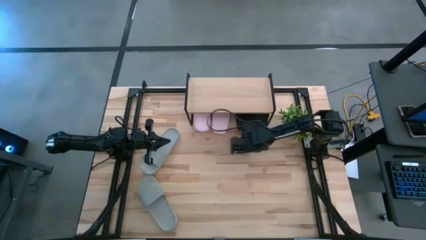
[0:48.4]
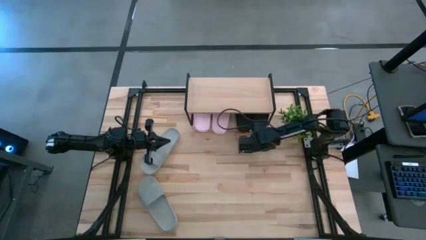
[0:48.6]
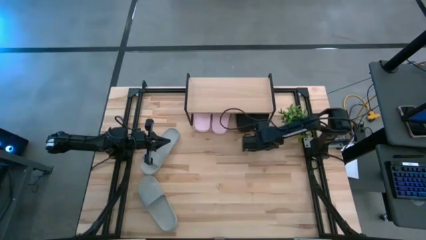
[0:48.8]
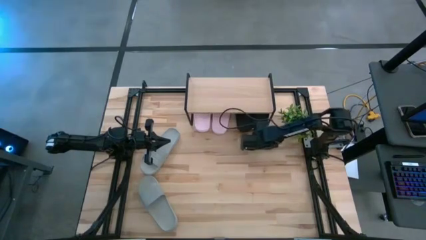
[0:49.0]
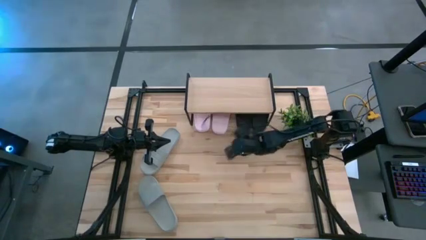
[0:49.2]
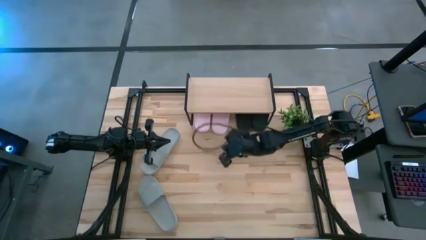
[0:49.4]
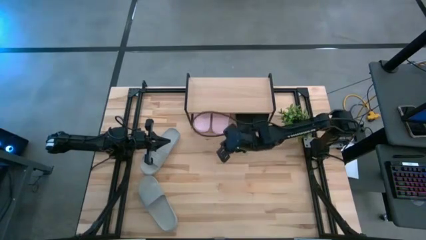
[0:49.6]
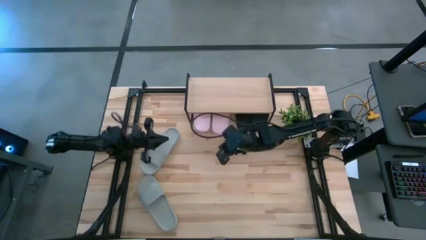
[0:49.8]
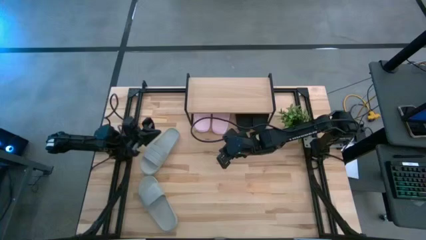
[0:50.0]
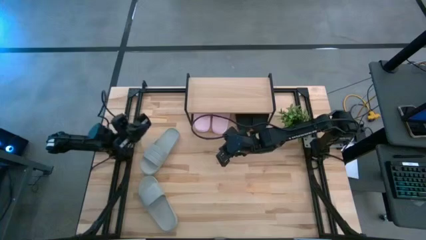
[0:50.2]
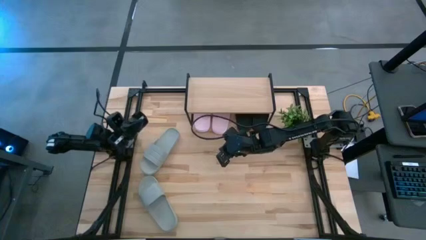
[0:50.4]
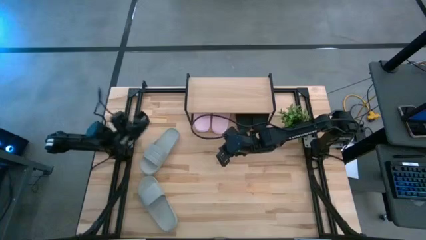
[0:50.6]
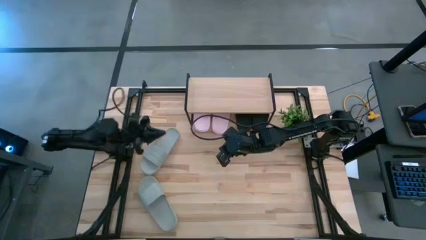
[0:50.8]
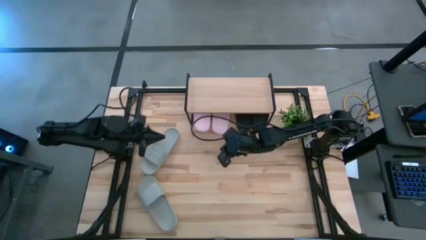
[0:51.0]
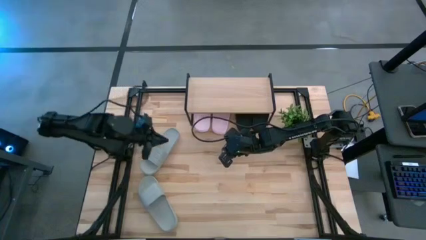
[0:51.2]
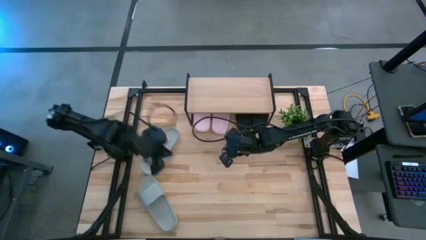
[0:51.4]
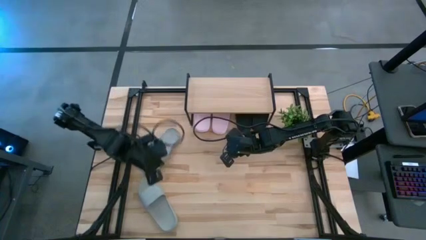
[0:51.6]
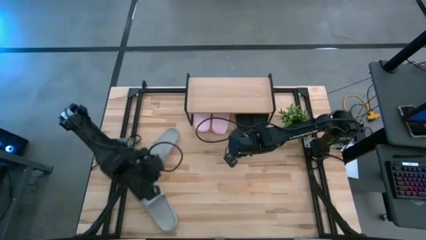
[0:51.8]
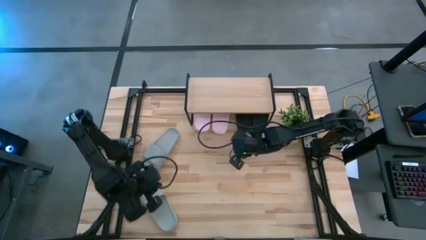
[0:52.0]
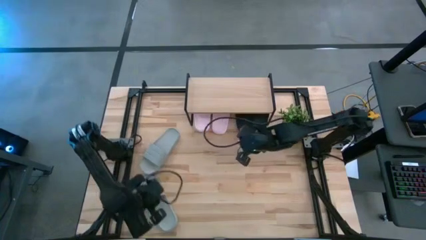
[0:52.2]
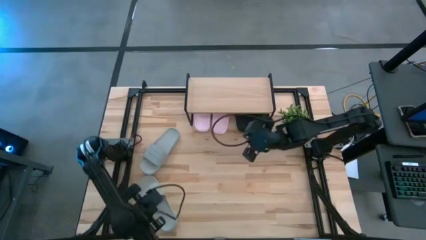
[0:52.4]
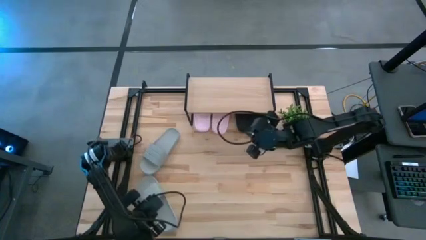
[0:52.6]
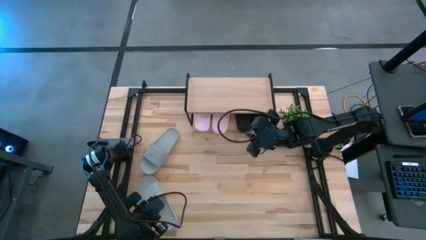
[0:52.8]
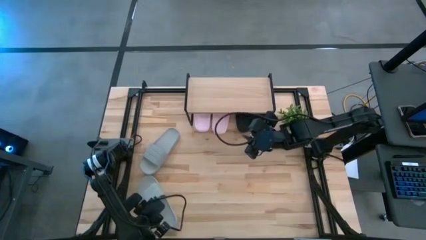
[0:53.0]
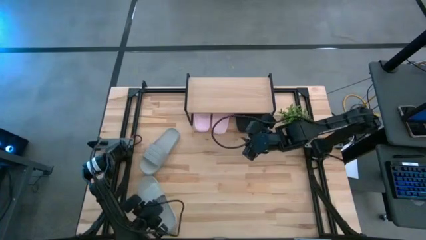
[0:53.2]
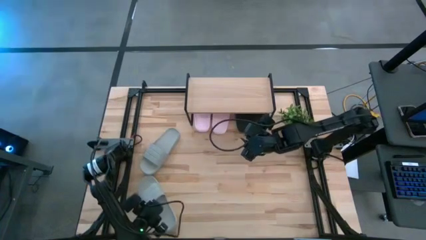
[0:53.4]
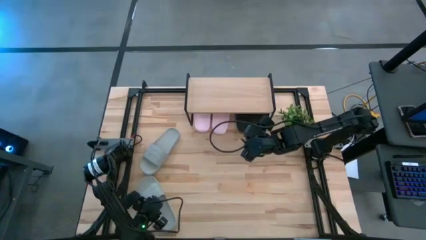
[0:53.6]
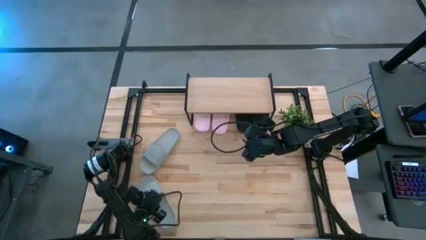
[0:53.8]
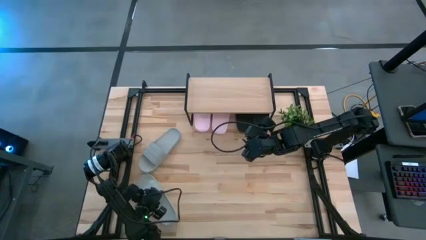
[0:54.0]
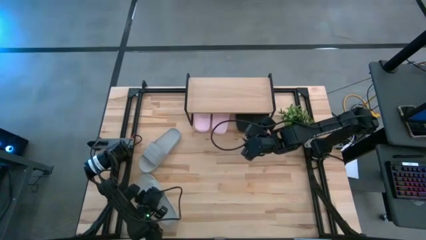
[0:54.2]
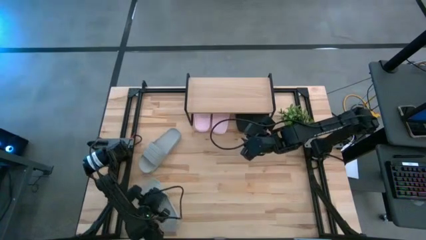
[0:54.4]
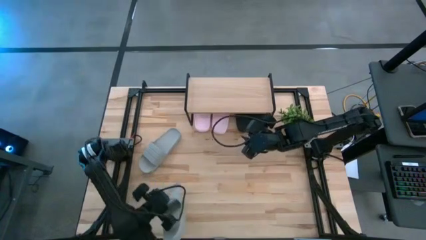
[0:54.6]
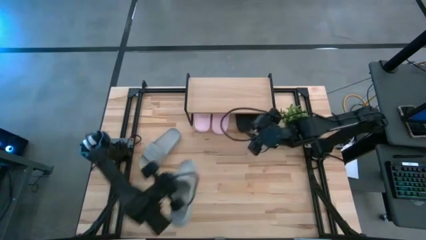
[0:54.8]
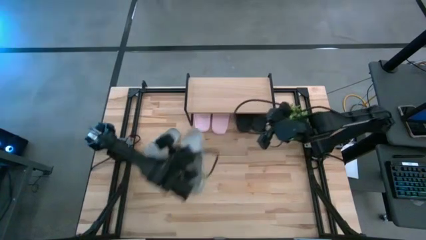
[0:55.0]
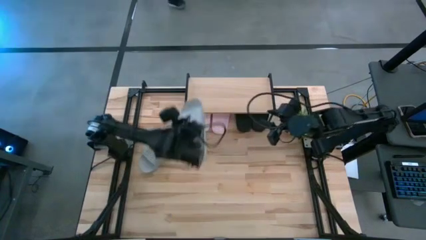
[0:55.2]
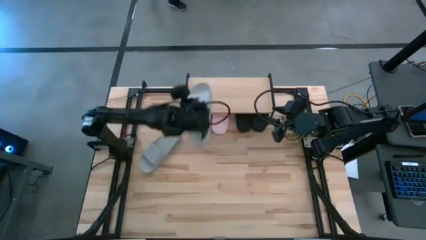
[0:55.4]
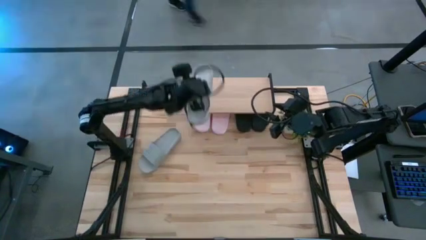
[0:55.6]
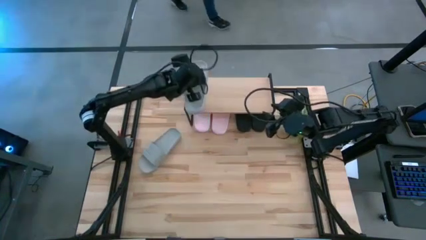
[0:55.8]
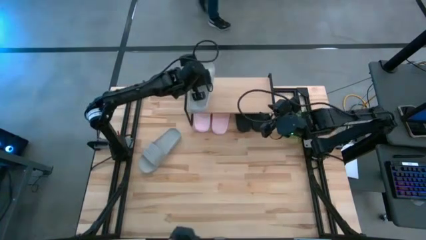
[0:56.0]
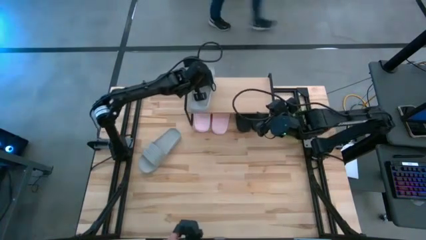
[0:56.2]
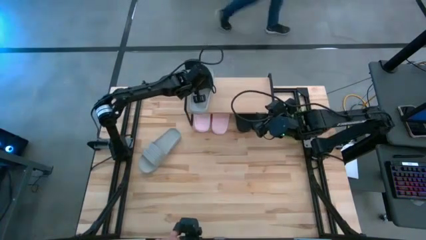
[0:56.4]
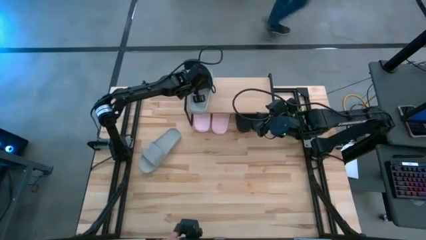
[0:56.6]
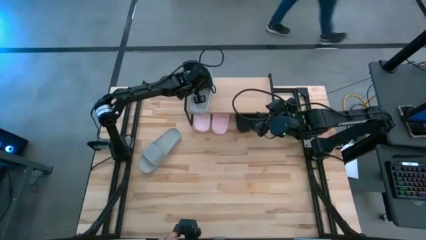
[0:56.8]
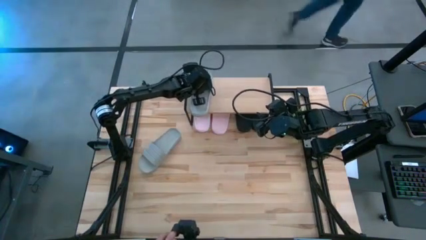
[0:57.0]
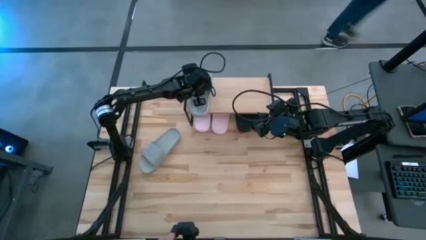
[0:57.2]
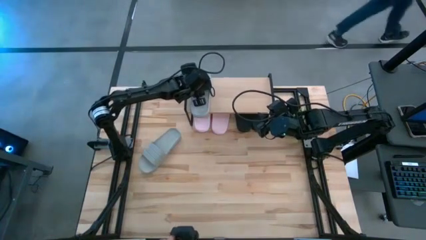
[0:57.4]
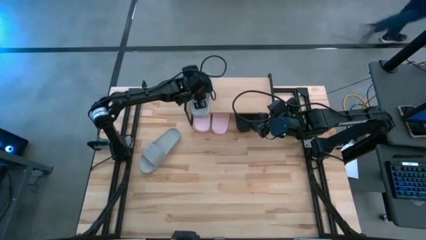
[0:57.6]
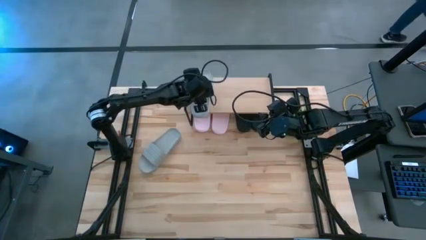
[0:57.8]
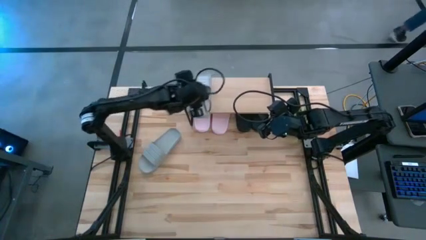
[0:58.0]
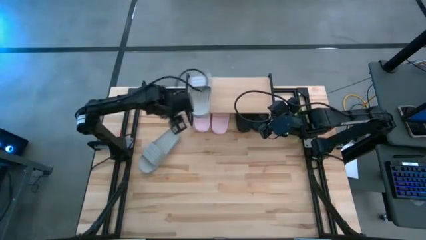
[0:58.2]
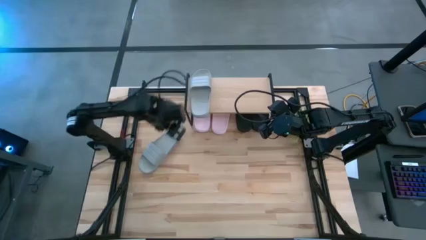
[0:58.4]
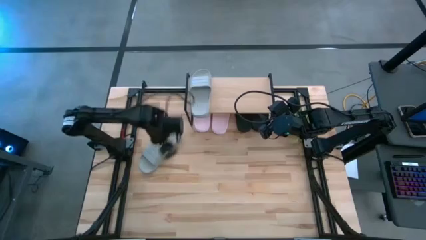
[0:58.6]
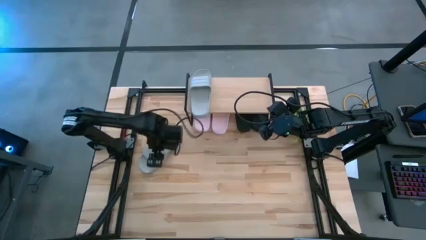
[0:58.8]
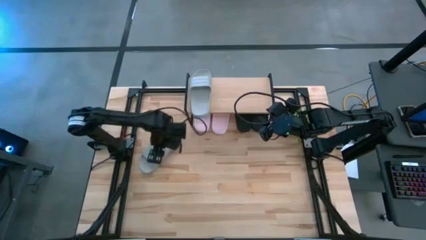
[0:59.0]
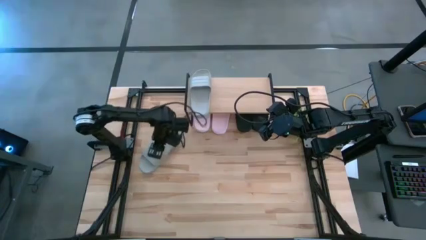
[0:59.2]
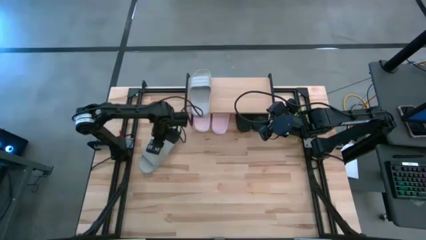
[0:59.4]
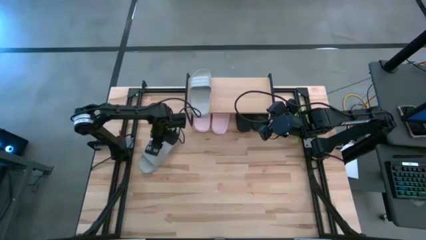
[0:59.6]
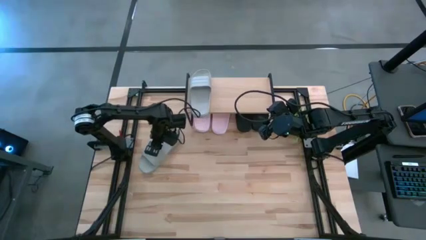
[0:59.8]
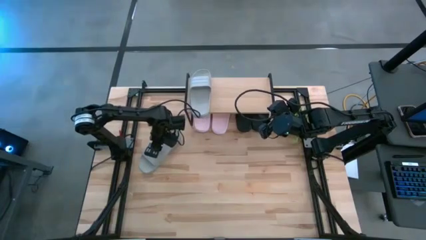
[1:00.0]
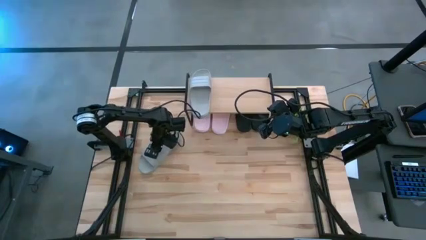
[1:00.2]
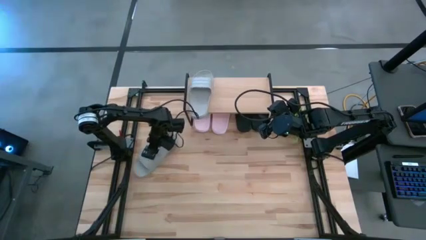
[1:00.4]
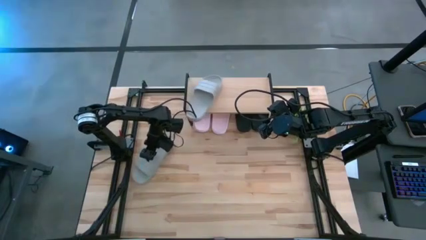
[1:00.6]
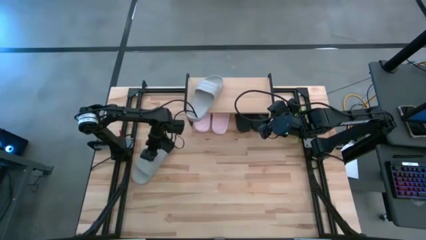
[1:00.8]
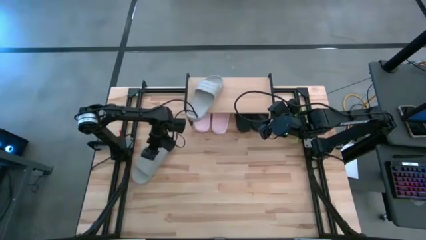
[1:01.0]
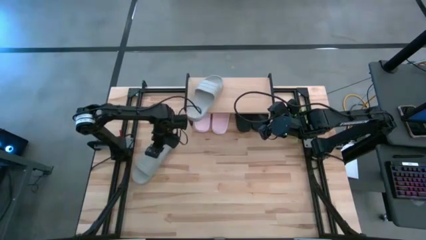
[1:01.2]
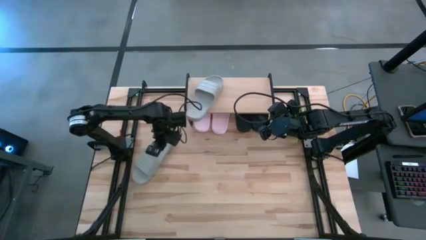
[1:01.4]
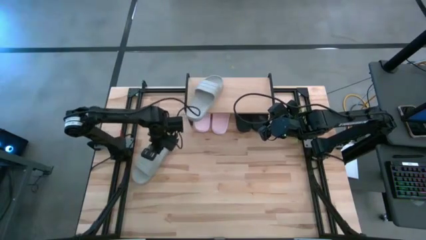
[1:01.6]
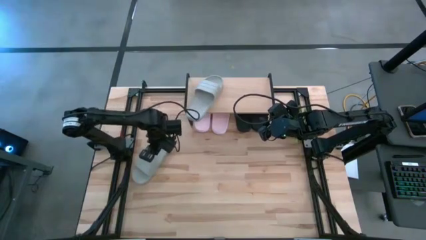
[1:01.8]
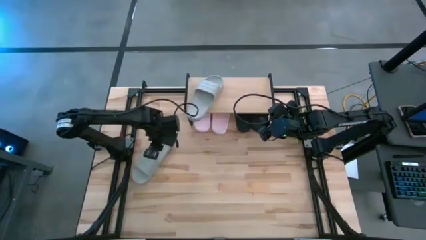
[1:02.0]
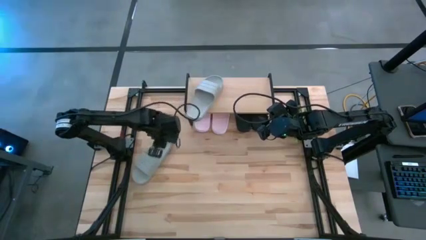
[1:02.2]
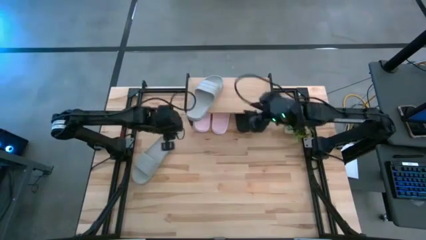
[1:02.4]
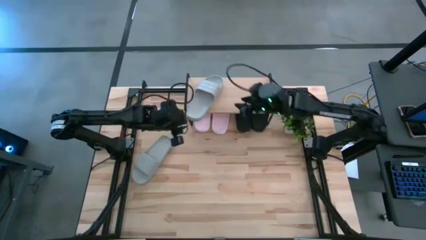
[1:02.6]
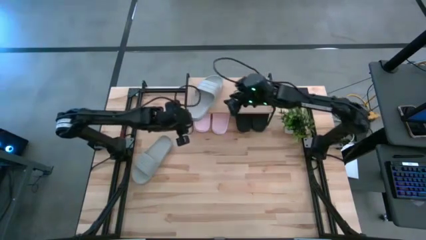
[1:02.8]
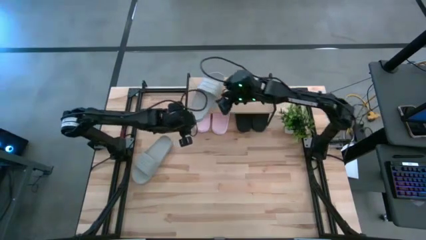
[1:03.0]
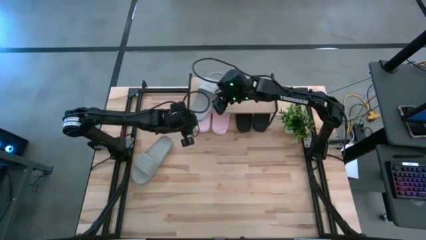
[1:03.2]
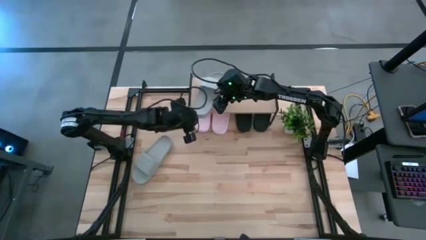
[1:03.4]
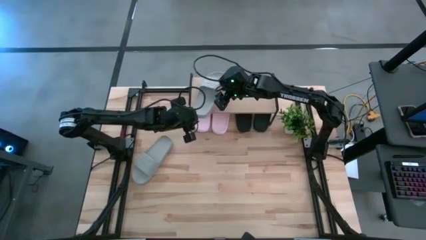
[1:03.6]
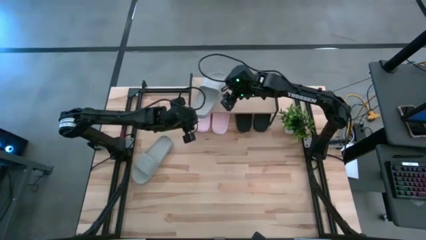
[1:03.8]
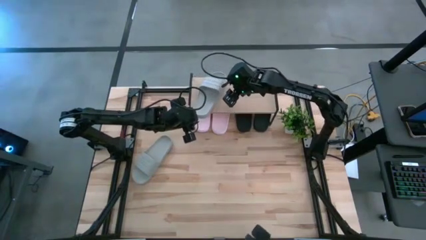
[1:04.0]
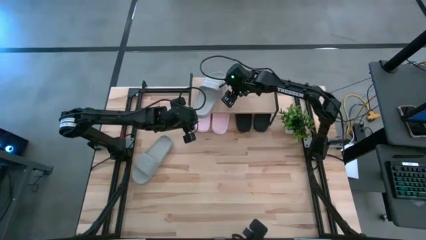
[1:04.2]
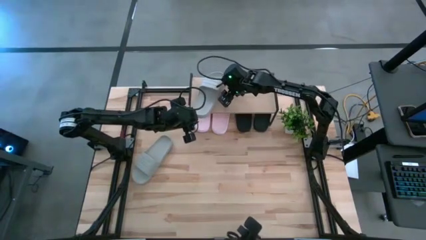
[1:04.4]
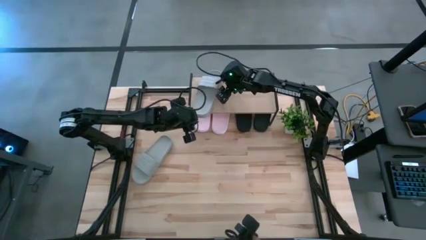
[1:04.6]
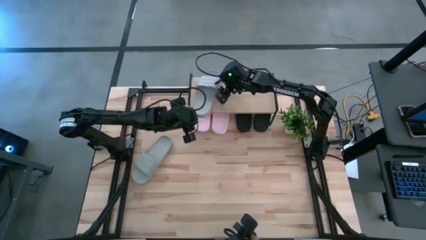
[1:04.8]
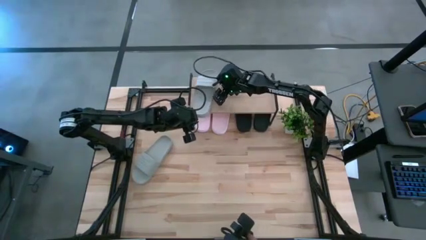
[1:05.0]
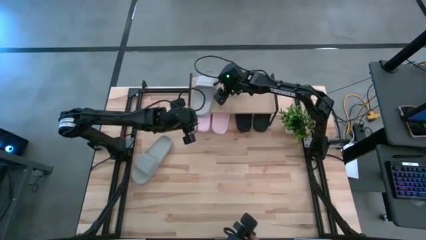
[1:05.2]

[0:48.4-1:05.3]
Task: Pick and place slides into the shelf
Put the left gray slide on the shelf
